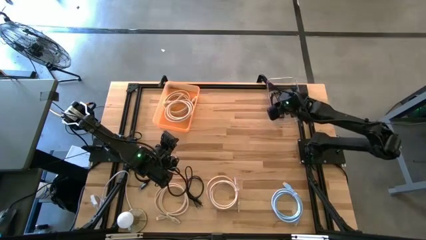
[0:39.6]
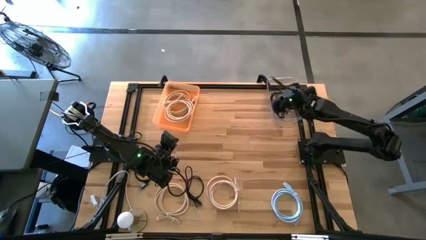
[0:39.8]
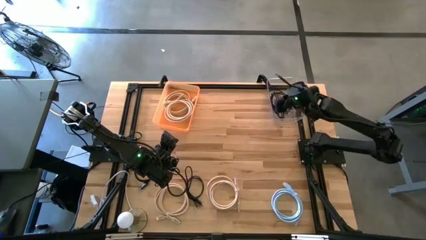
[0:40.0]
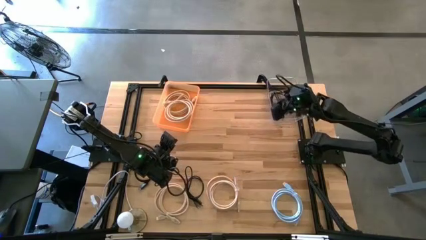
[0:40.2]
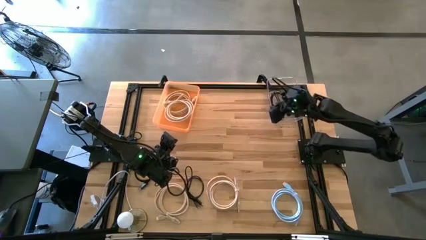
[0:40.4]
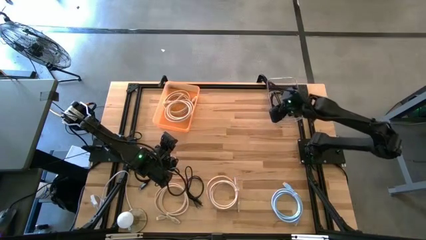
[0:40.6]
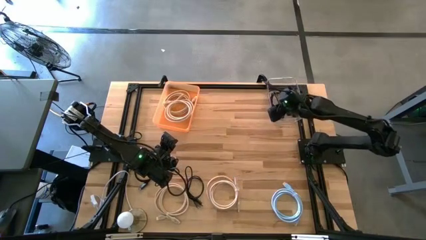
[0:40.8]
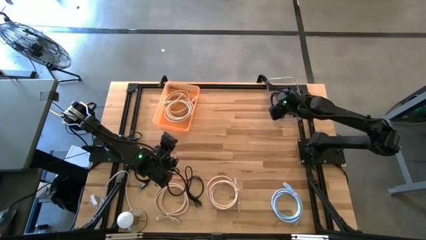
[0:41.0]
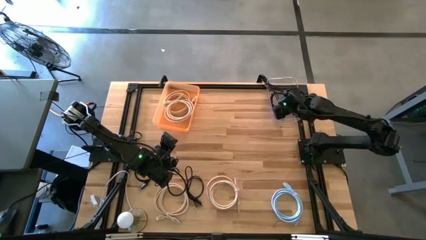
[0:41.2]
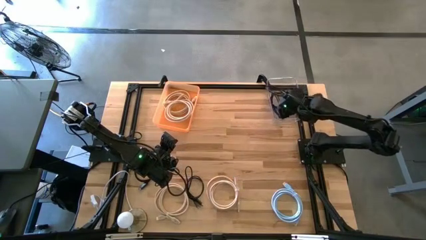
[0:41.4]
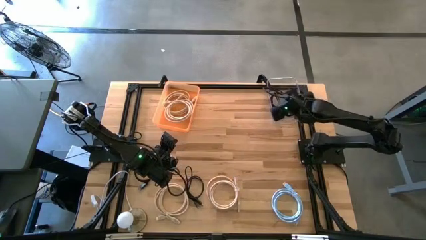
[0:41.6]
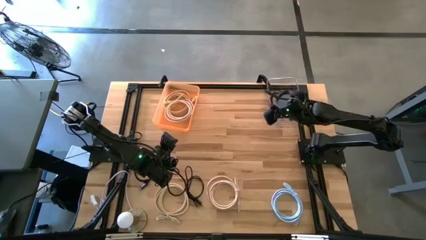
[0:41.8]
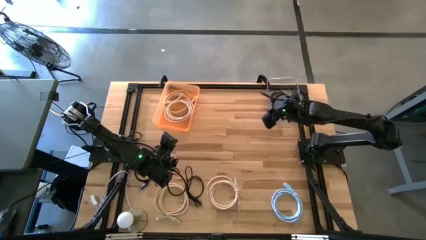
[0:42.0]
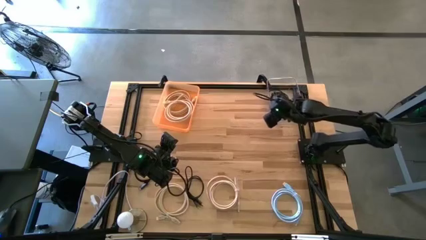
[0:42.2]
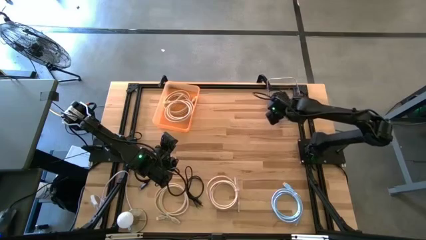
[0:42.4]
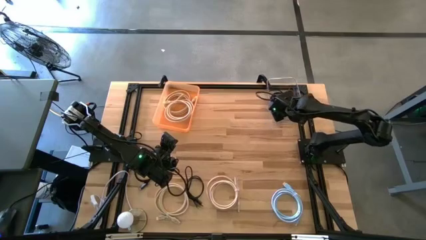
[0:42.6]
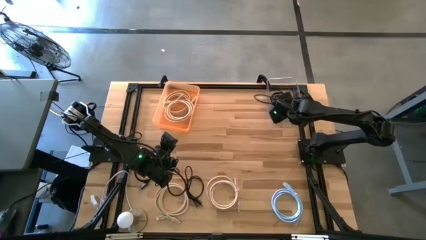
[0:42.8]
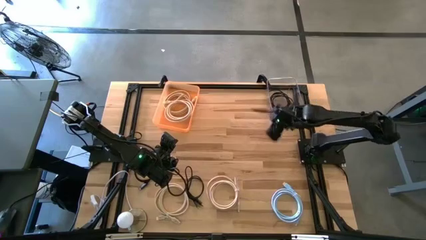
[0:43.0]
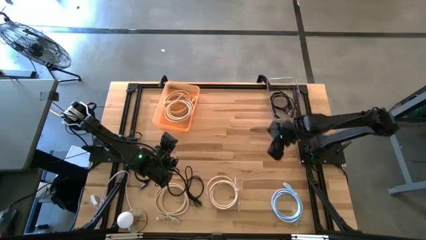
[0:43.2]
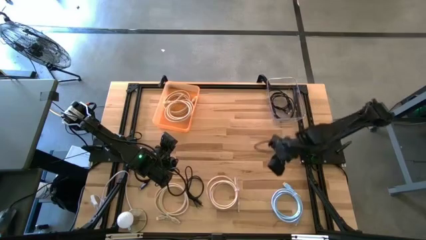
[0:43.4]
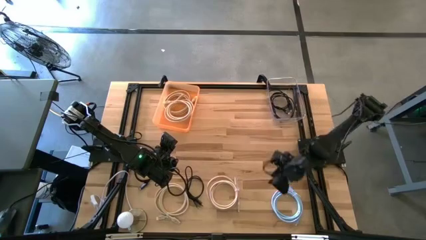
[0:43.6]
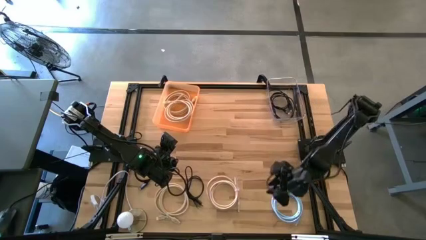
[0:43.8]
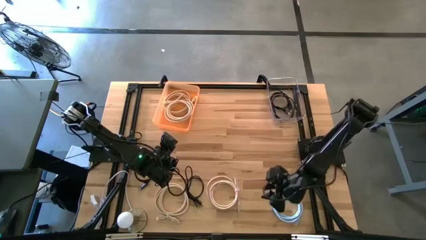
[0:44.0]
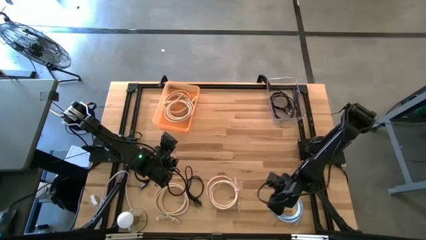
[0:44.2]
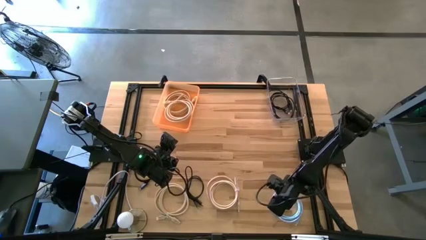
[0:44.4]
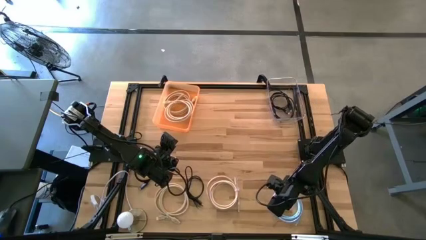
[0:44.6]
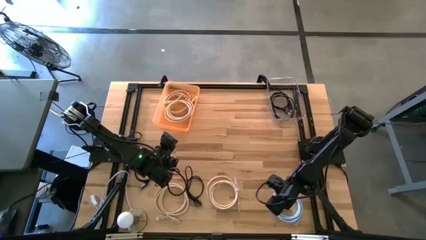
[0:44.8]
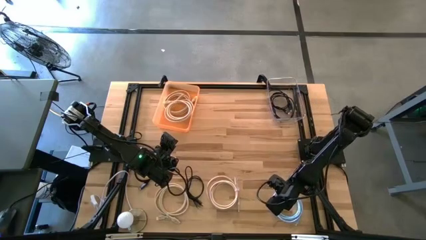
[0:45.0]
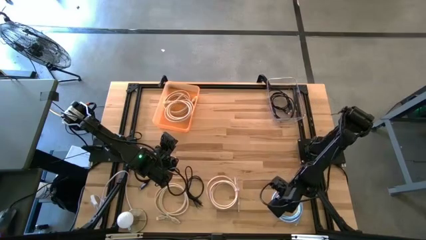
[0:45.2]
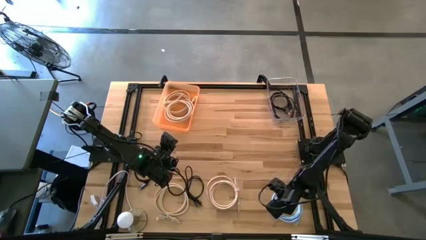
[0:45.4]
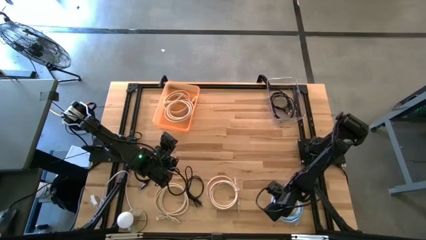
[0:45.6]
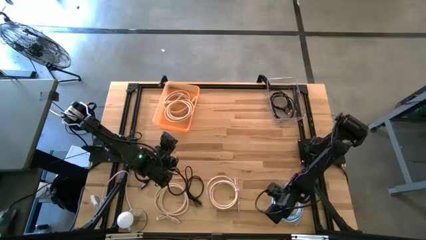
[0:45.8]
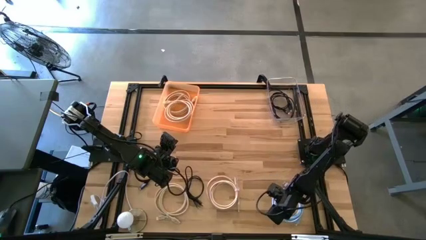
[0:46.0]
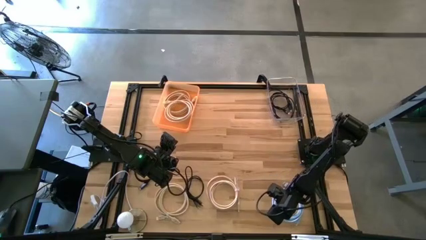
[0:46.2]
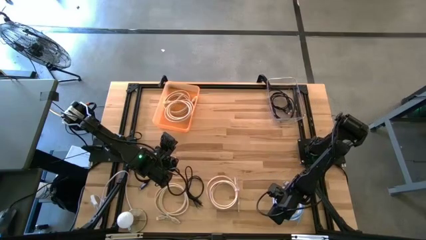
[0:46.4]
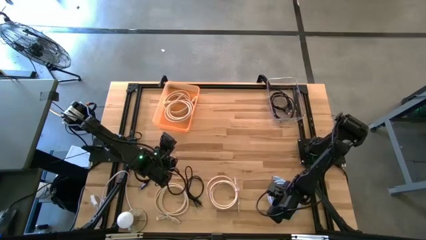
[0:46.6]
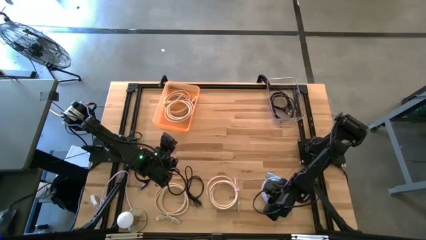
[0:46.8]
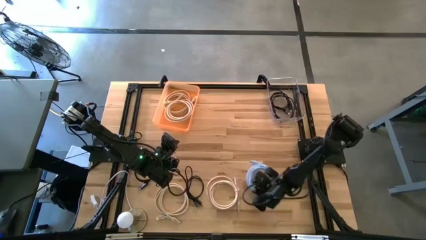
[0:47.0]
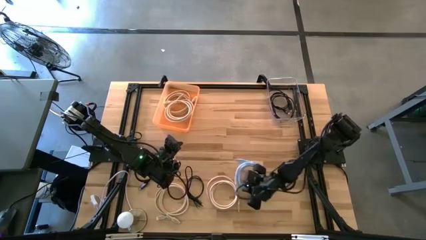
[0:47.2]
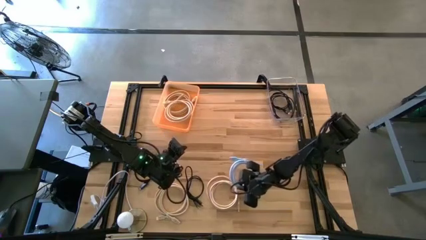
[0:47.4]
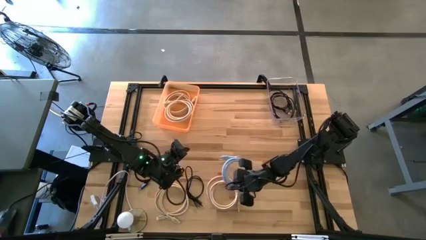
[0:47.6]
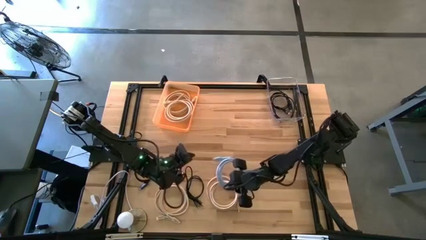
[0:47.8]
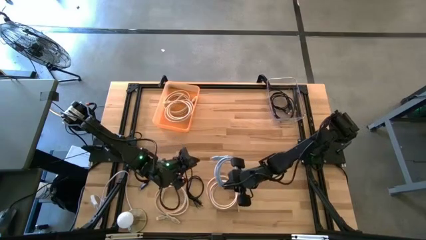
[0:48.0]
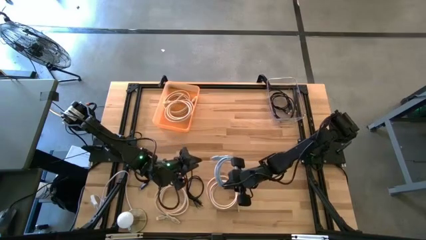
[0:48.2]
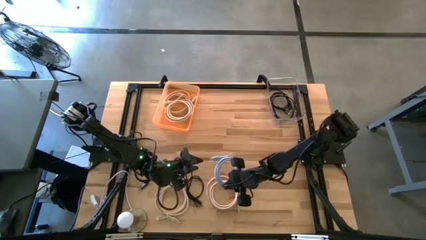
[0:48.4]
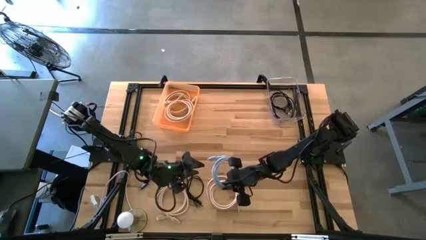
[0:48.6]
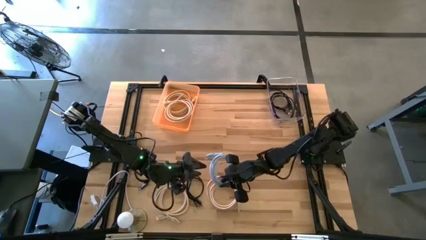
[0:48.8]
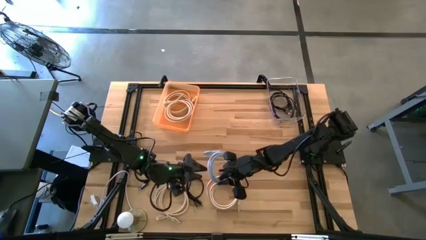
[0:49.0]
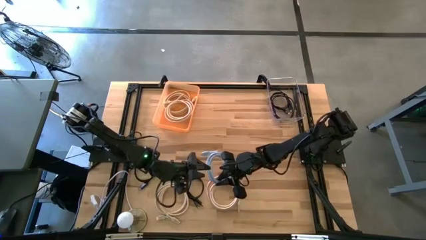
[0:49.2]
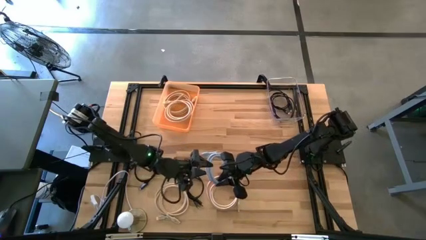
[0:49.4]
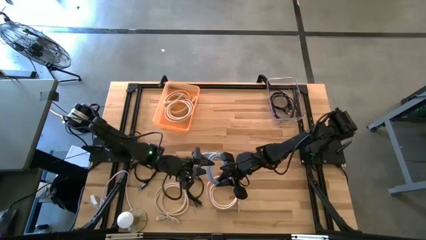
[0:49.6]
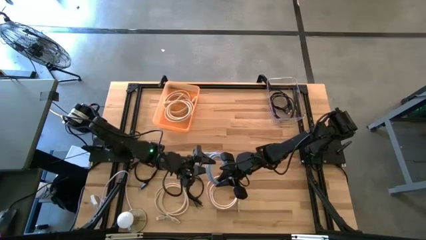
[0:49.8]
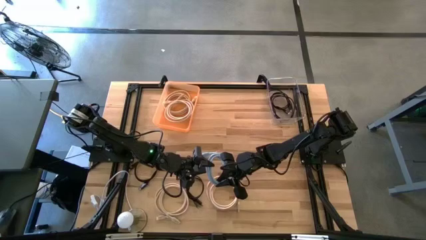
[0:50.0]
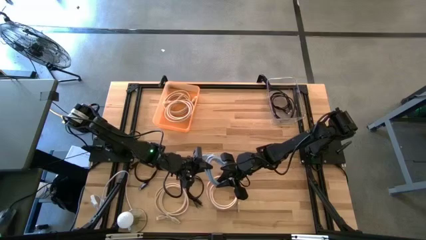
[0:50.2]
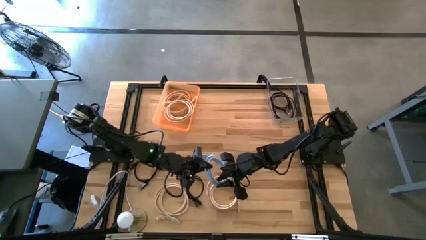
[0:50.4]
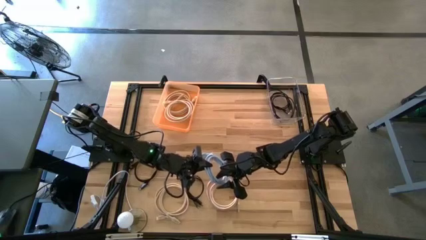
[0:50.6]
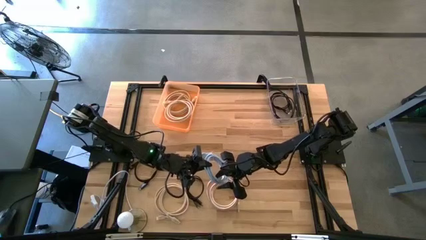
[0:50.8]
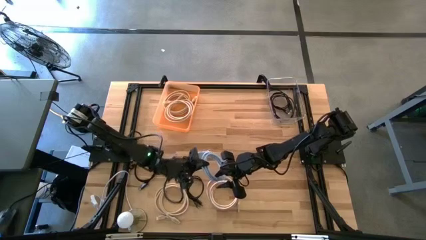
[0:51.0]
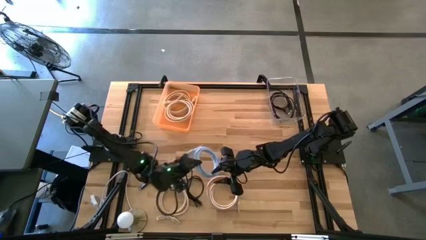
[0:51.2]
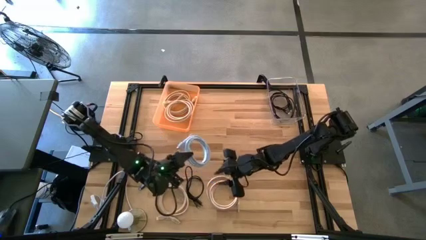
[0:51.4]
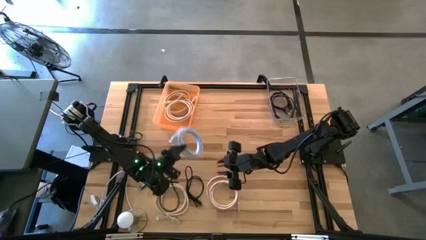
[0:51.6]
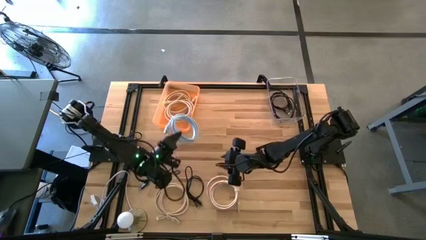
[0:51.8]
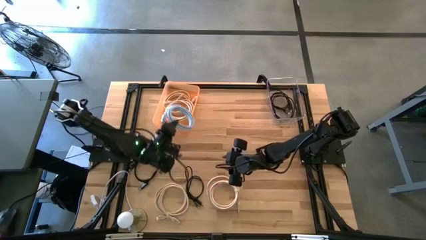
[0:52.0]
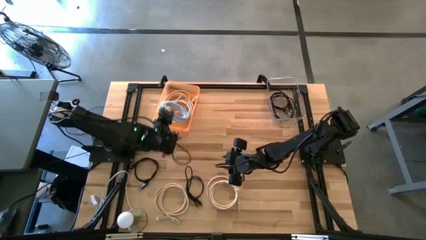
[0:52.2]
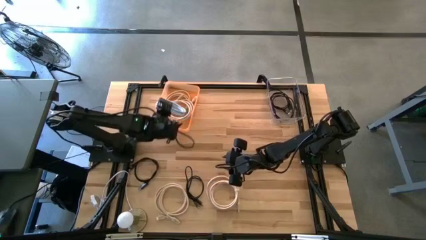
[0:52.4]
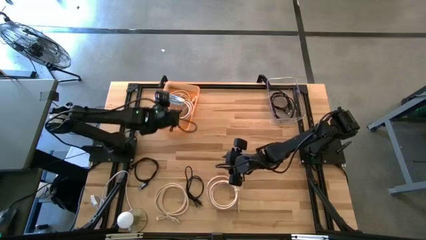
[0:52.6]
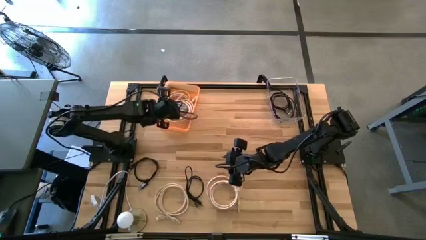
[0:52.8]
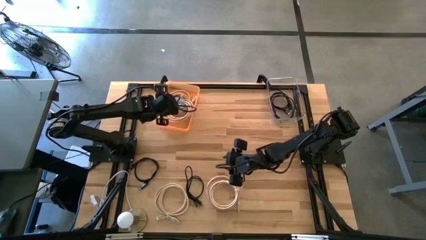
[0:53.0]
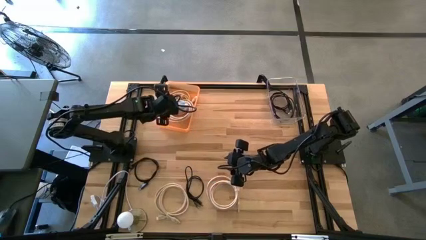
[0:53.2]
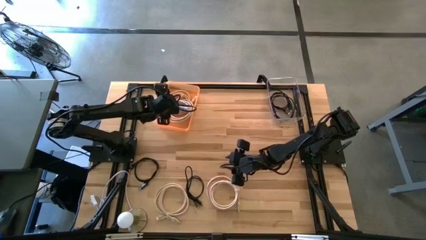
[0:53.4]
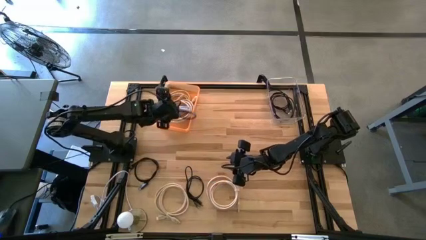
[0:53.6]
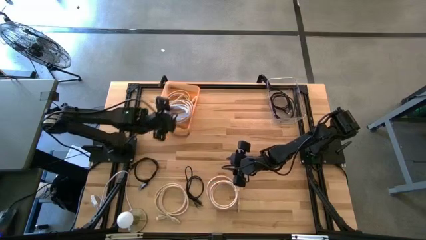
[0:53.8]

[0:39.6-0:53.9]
Task: Pick & Place USB Port
Put the light blue hdmi cable into the orange bin

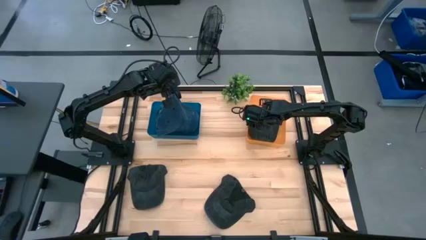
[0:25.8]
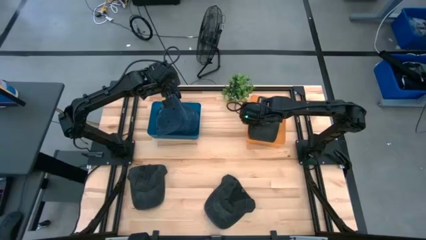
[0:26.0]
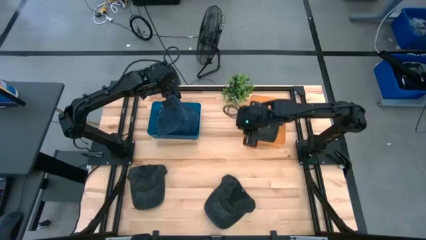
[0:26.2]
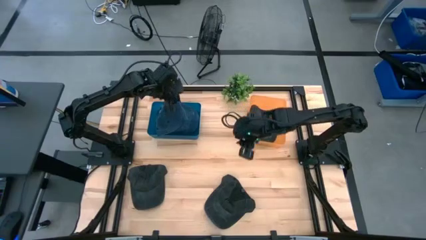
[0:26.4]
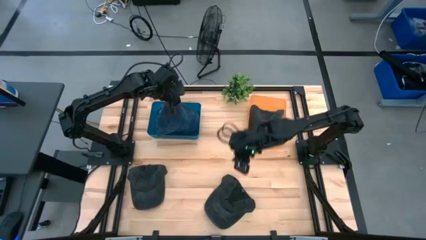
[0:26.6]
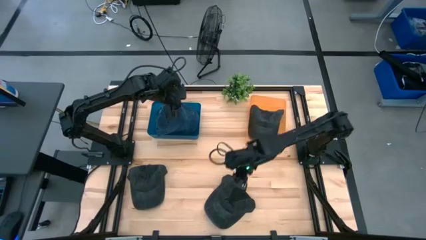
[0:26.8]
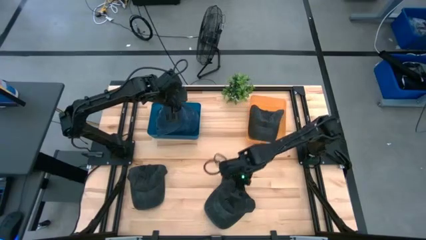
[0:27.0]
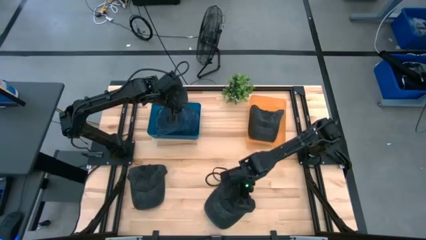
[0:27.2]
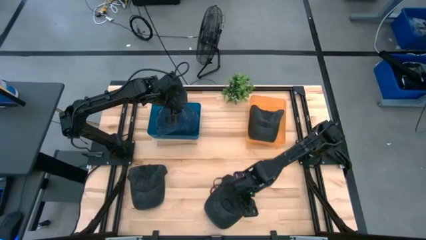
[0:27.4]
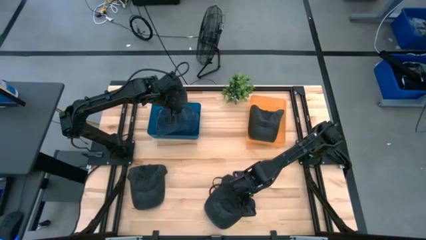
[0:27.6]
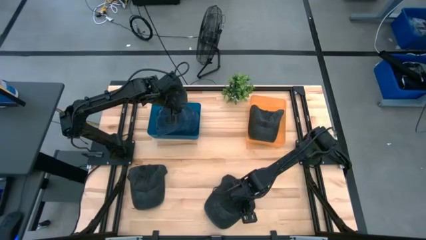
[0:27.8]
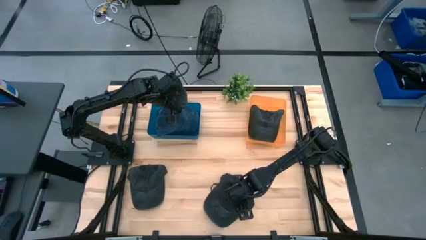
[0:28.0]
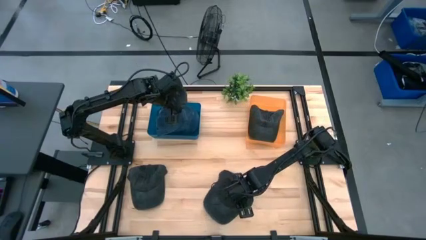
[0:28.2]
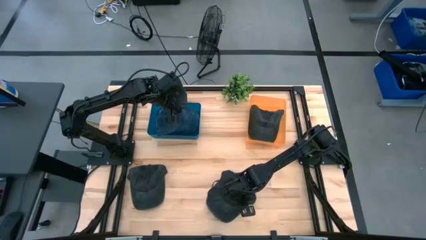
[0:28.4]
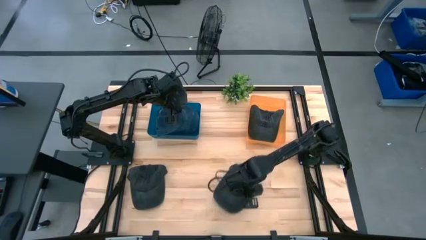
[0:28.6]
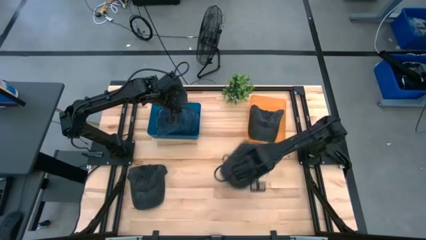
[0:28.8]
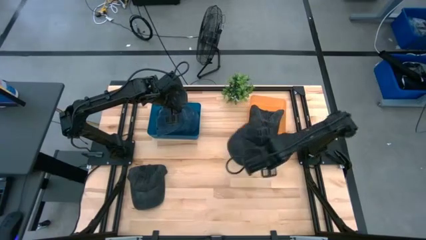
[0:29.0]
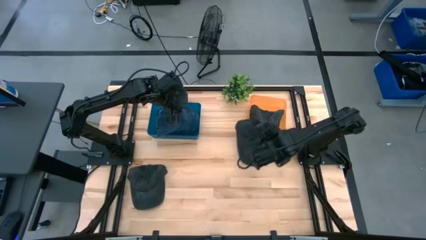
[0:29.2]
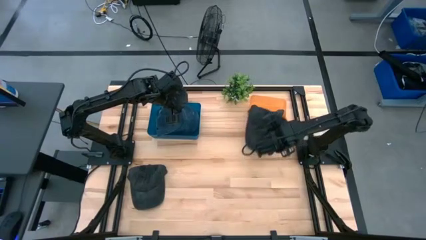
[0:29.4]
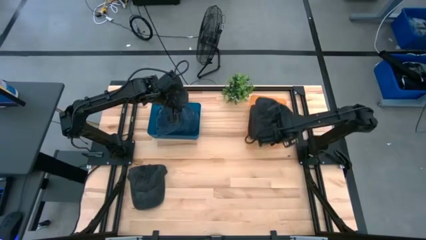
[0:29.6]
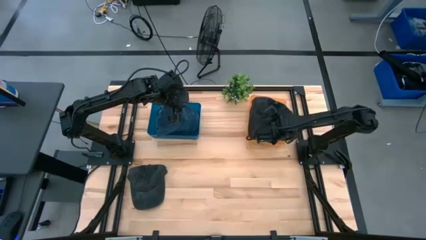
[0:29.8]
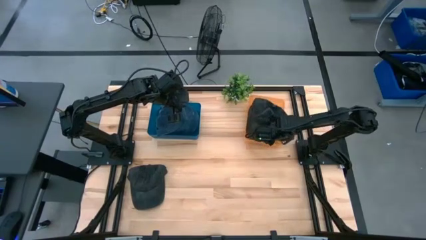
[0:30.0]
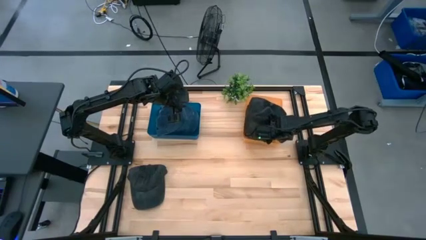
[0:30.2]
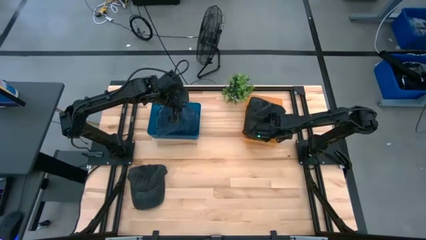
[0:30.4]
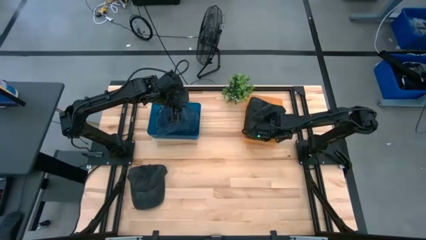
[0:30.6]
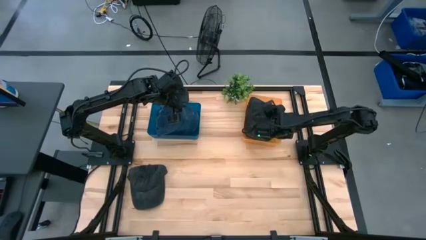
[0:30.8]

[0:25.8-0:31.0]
Task: Pick & Place hat
Put the right black cap into the orange bin
